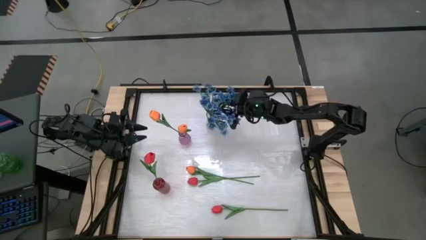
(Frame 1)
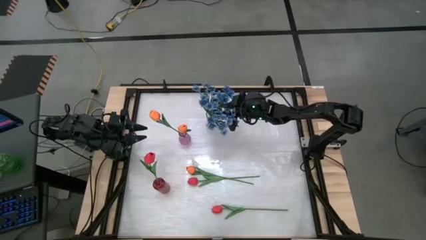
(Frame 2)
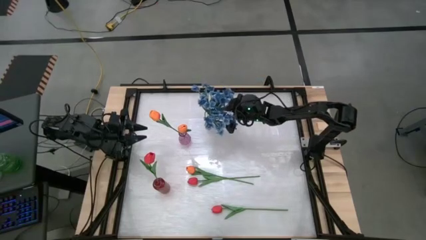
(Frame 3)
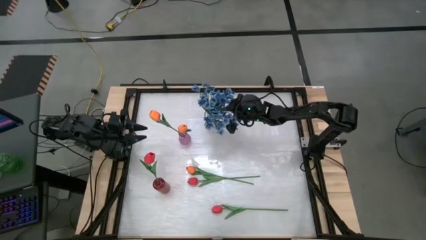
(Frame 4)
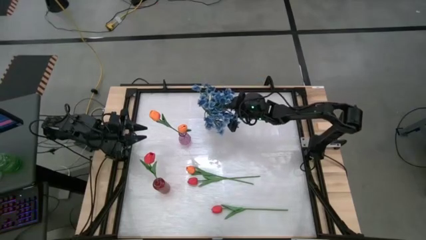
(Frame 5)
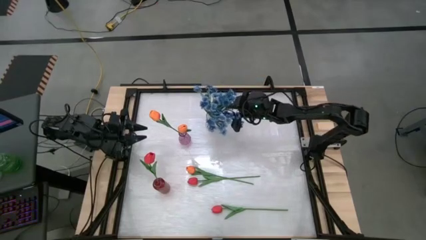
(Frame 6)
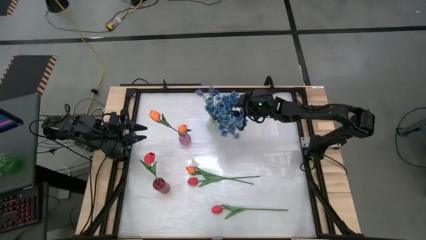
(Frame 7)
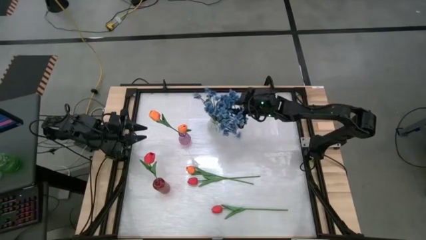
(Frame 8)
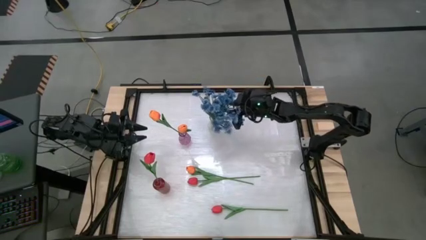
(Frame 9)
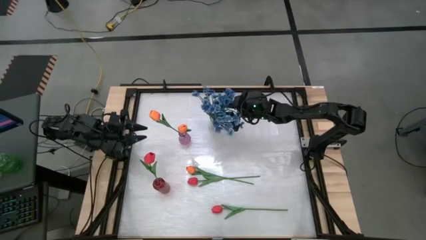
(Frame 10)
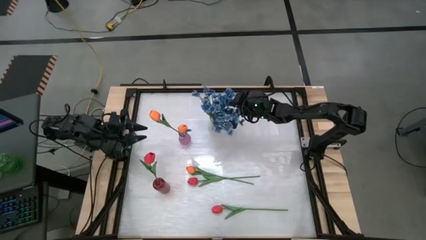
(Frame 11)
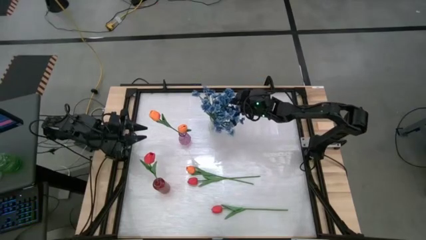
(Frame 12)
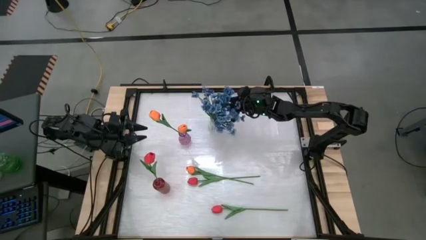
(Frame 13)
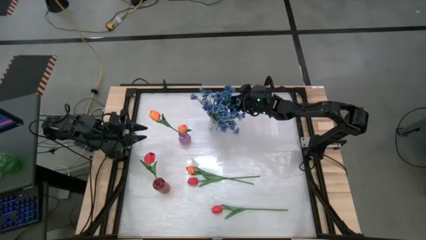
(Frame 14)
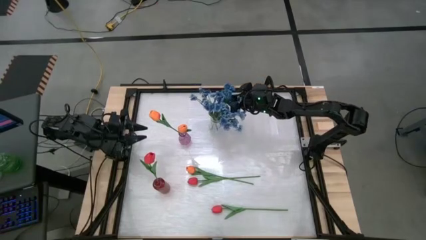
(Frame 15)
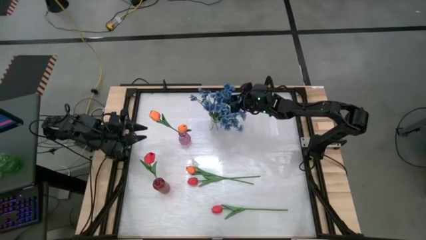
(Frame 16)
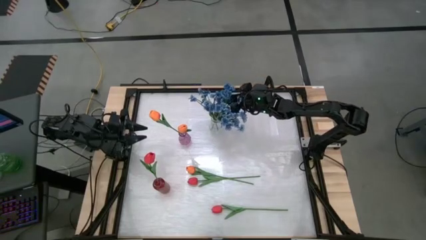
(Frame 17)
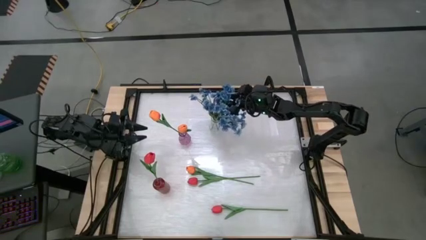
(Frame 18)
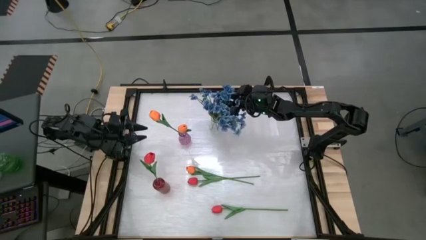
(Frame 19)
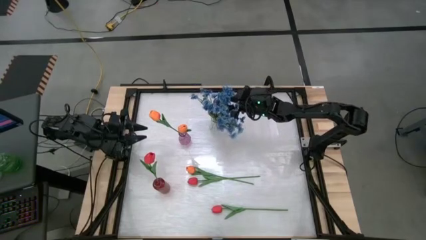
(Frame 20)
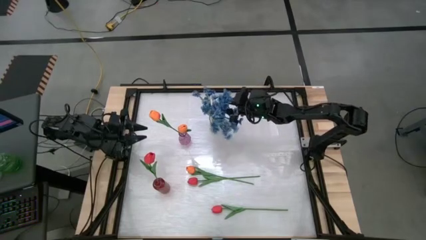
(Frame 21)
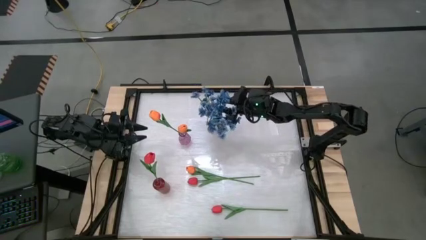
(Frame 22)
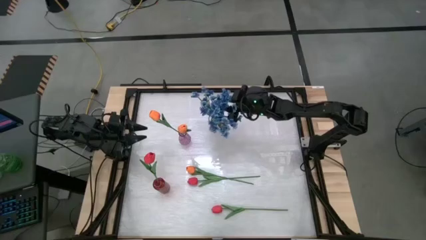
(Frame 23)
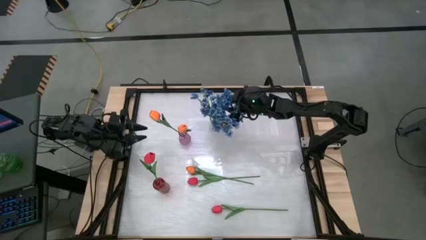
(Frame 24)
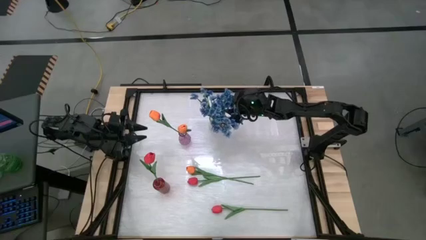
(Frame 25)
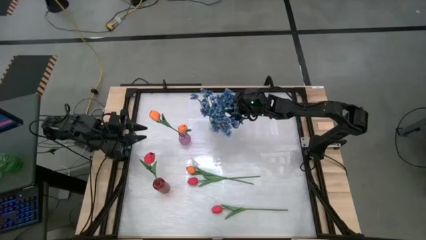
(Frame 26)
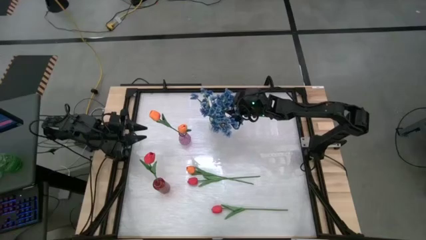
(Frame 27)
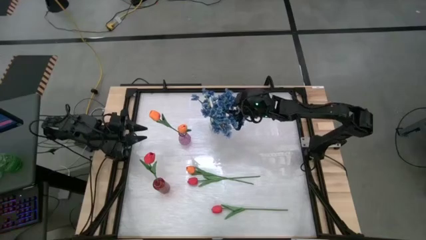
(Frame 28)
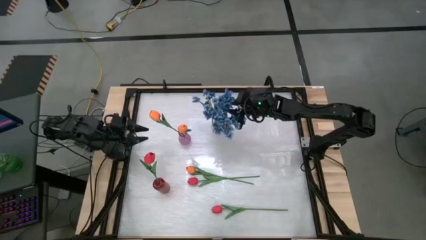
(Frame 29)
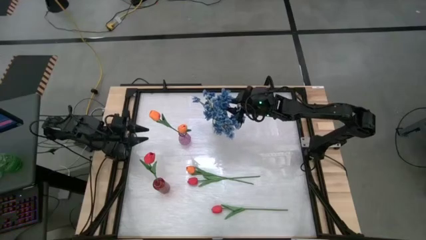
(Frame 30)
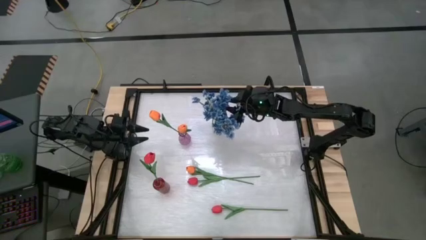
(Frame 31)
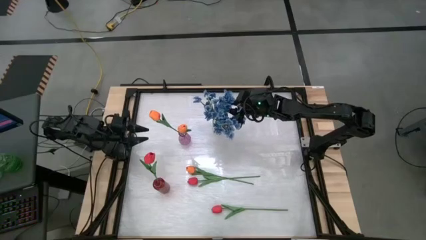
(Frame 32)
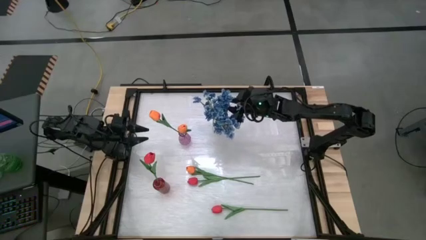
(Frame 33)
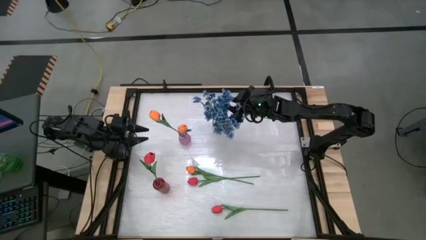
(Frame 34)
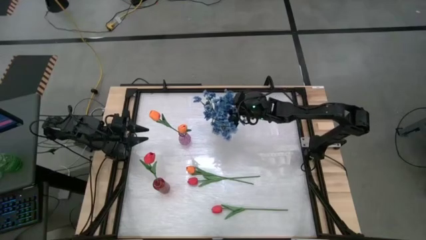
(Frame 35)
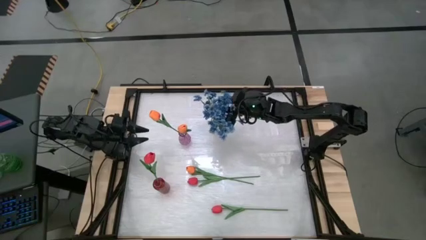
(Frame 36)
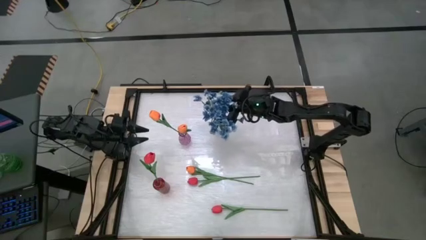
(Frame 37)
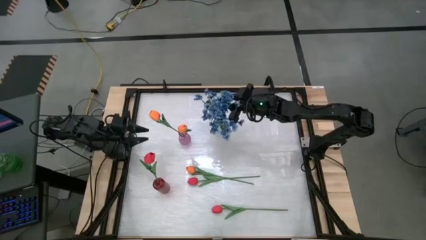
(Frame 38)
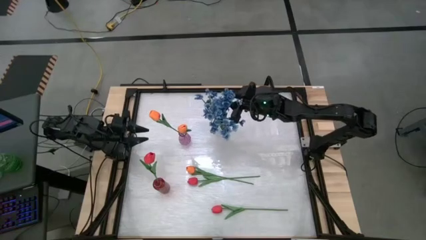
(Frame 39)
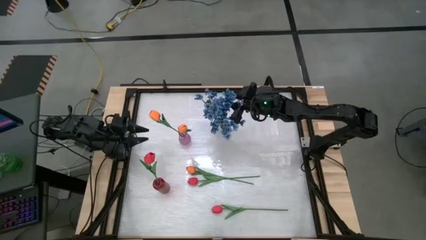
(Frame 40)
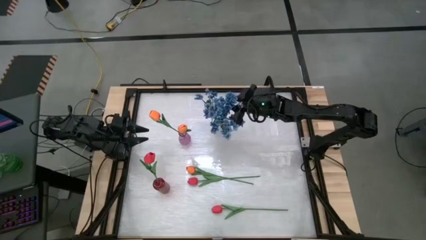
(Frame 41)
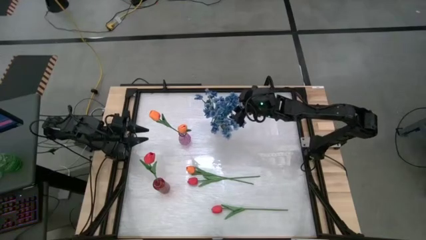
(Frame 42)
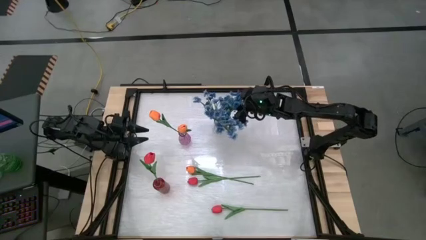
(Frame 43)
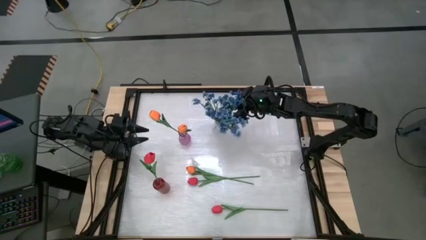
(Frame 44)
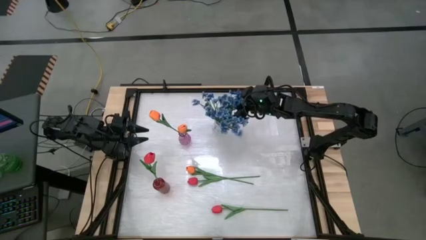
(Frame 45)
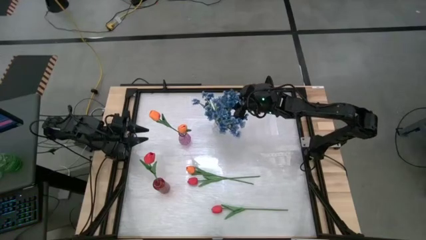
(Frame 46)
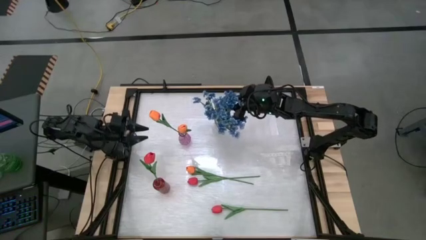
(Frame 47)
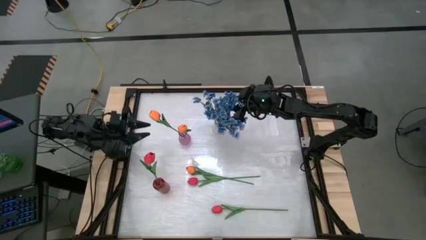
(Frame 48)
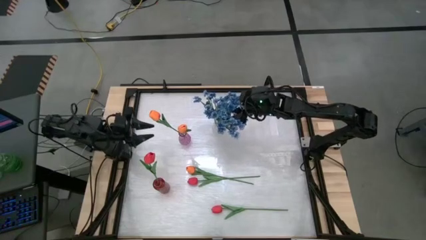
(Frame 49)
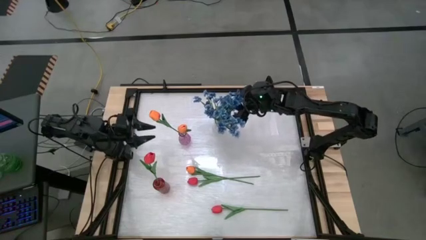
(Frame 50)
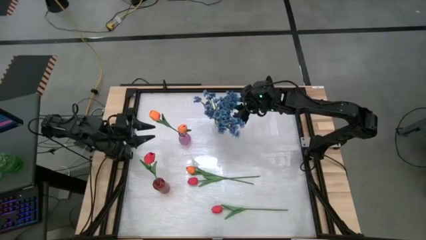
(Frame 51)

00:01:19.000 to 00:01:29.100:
Task: Sort flowers into vase by color
Put the blue flowers into the transparent vase
